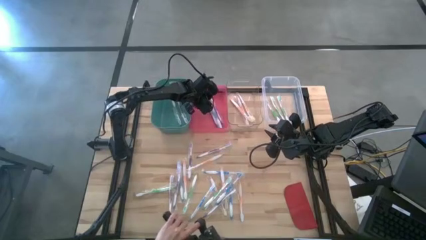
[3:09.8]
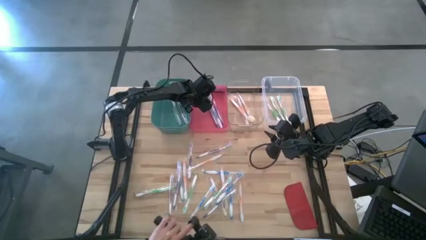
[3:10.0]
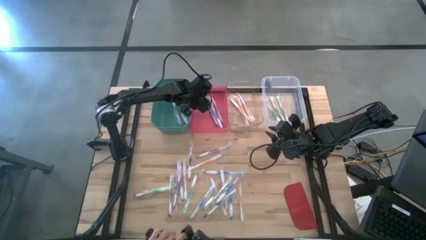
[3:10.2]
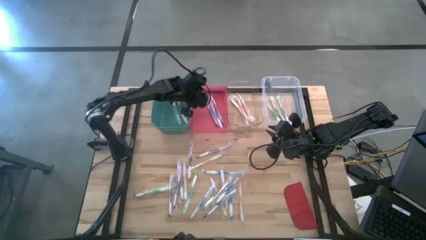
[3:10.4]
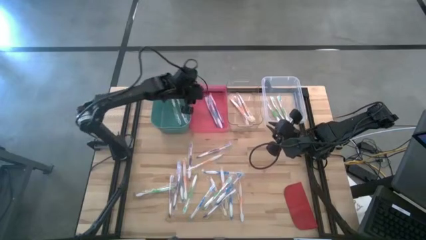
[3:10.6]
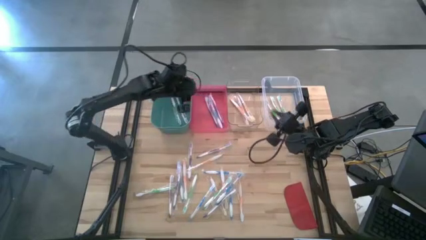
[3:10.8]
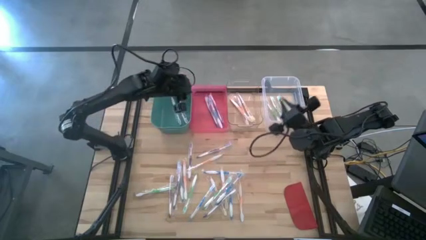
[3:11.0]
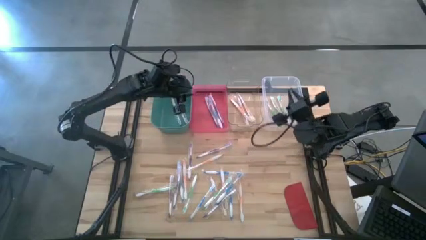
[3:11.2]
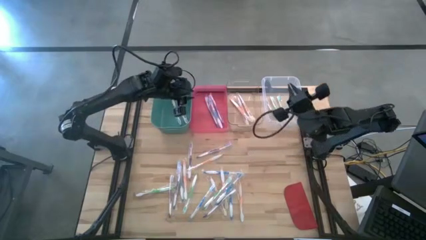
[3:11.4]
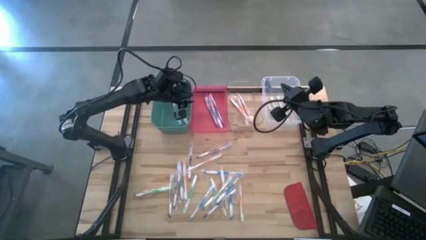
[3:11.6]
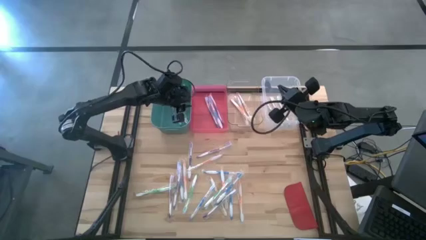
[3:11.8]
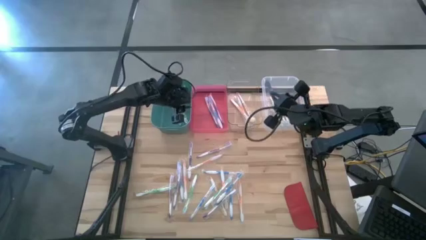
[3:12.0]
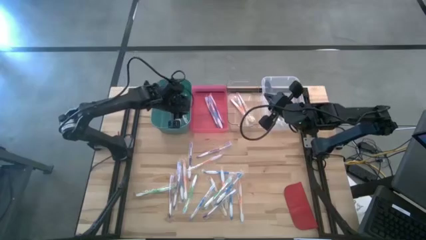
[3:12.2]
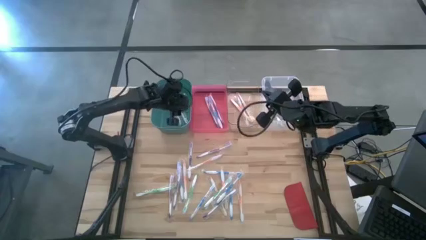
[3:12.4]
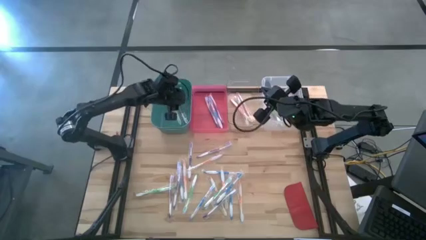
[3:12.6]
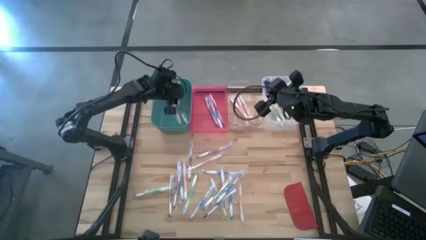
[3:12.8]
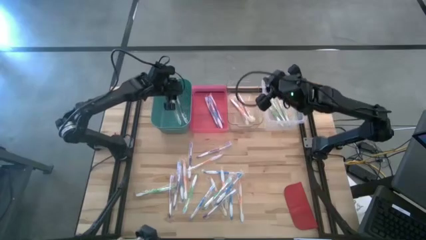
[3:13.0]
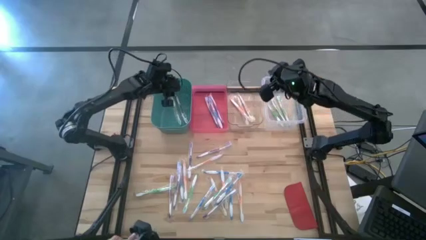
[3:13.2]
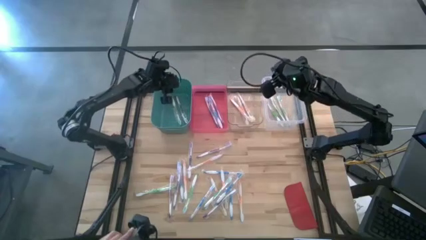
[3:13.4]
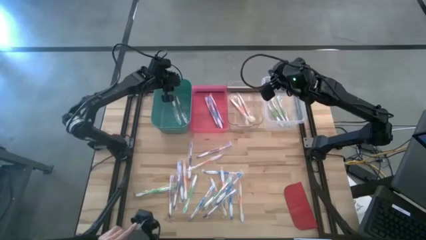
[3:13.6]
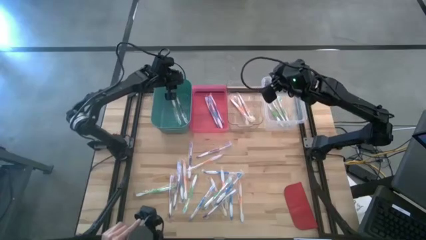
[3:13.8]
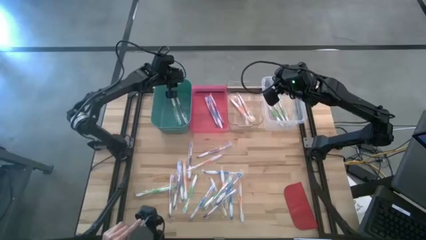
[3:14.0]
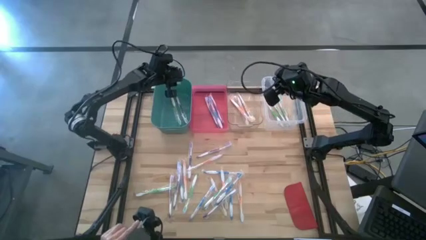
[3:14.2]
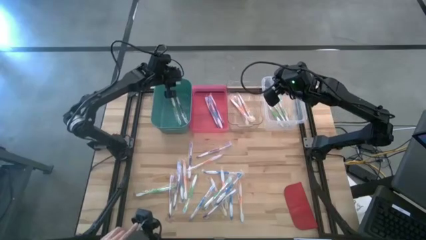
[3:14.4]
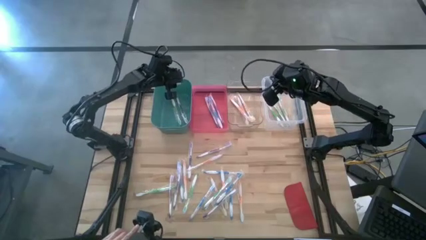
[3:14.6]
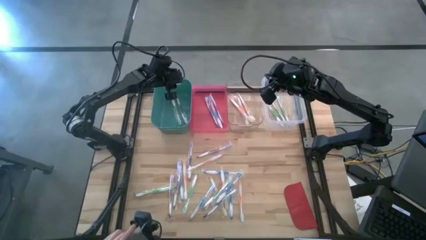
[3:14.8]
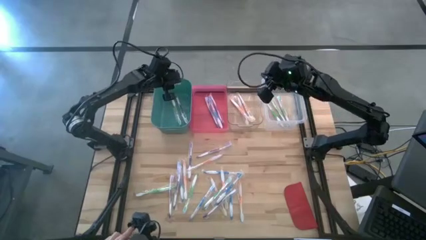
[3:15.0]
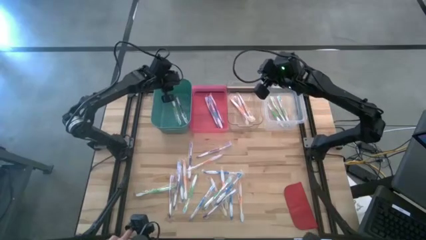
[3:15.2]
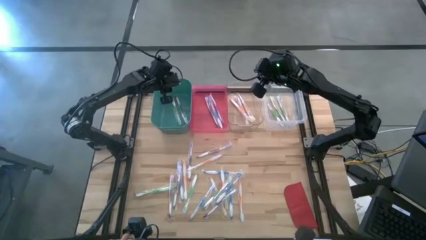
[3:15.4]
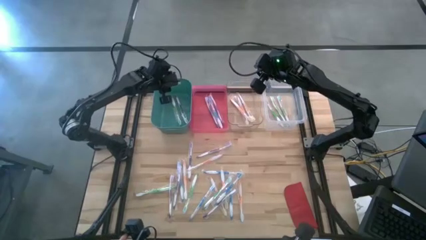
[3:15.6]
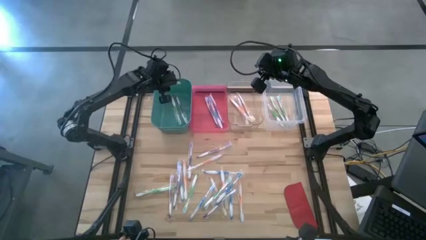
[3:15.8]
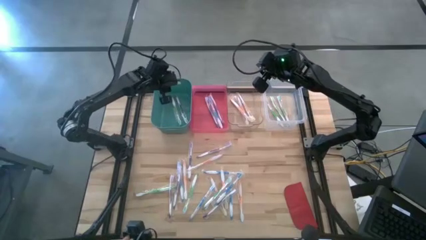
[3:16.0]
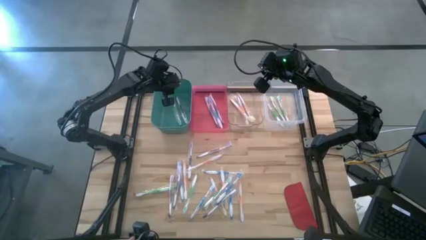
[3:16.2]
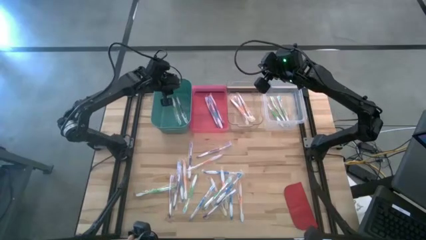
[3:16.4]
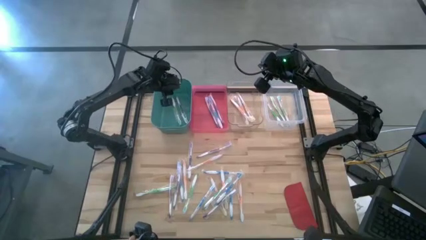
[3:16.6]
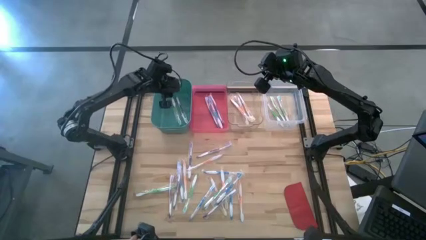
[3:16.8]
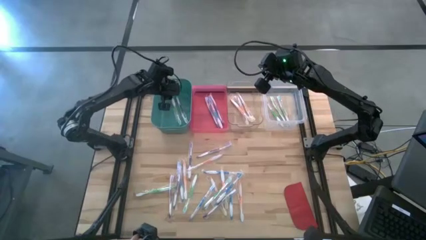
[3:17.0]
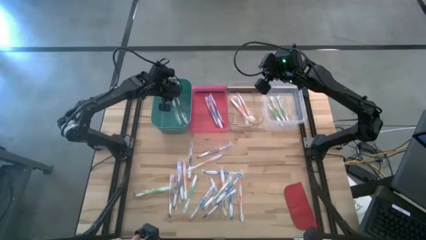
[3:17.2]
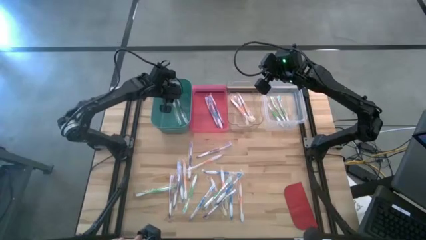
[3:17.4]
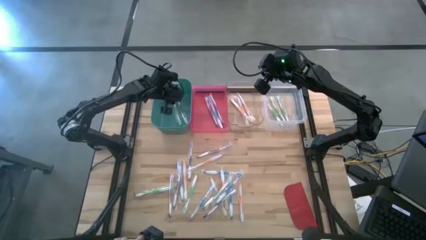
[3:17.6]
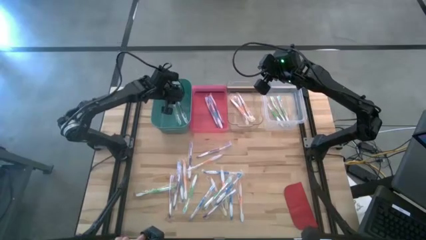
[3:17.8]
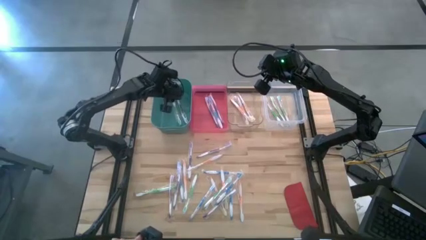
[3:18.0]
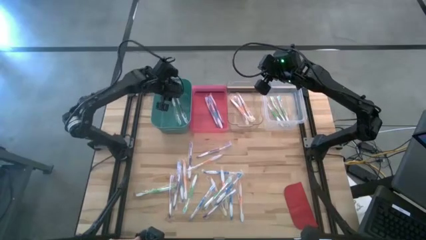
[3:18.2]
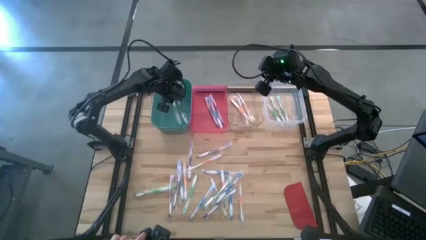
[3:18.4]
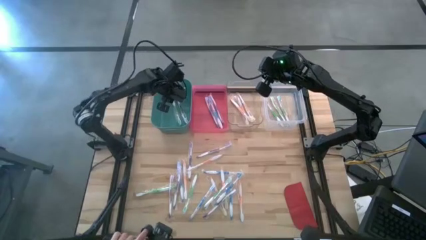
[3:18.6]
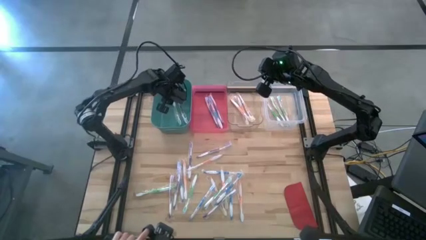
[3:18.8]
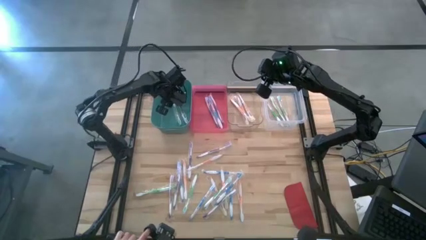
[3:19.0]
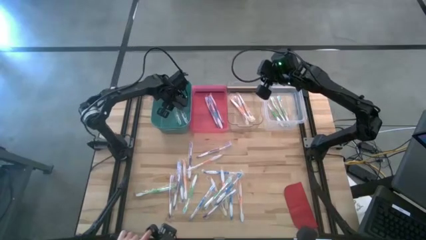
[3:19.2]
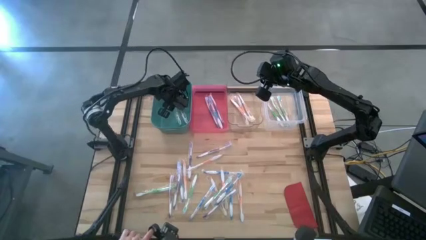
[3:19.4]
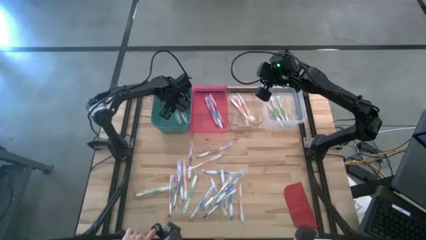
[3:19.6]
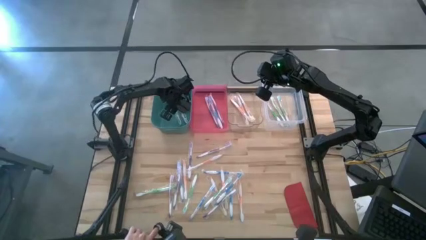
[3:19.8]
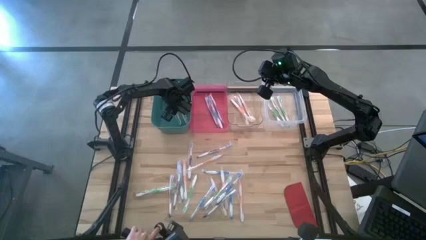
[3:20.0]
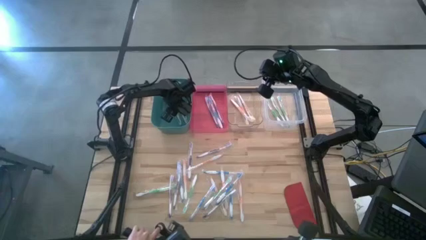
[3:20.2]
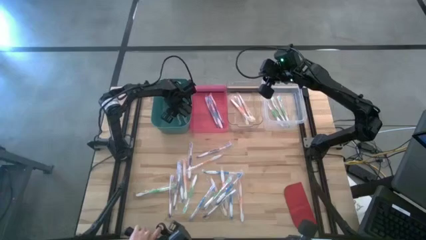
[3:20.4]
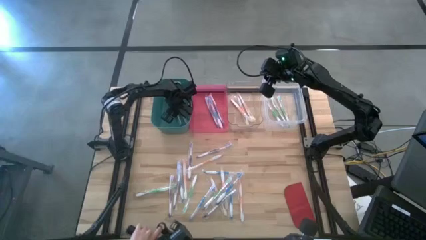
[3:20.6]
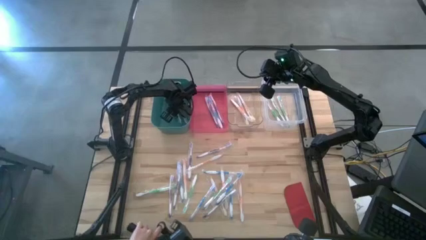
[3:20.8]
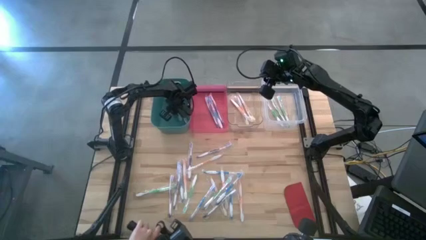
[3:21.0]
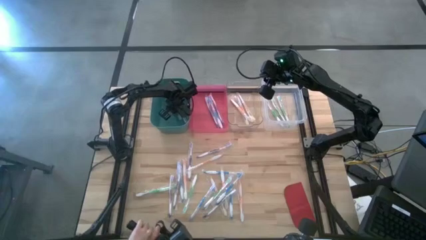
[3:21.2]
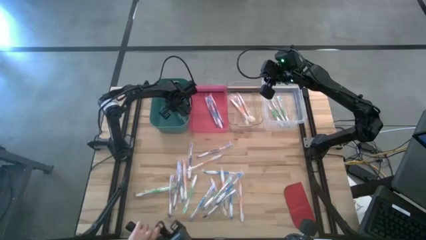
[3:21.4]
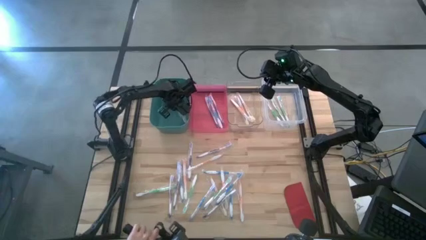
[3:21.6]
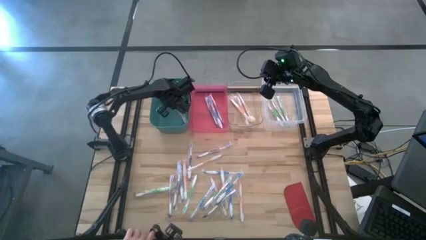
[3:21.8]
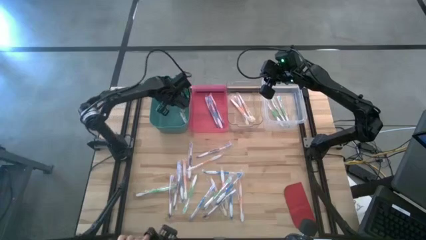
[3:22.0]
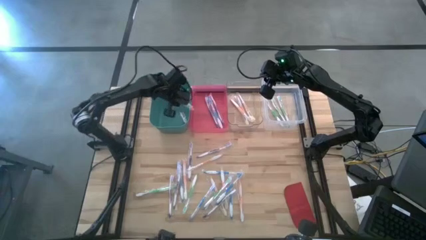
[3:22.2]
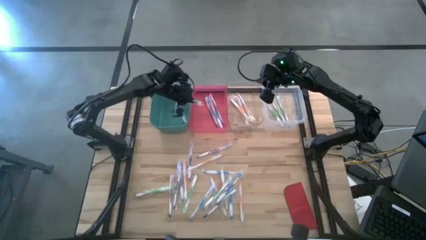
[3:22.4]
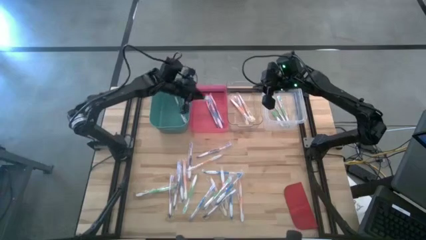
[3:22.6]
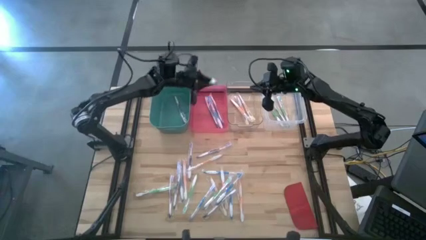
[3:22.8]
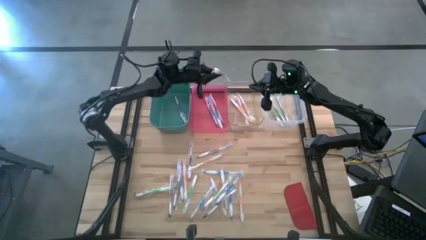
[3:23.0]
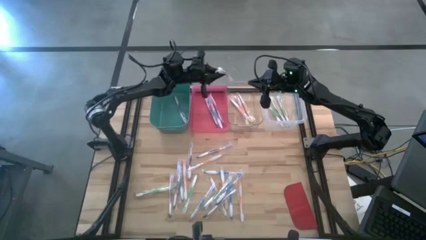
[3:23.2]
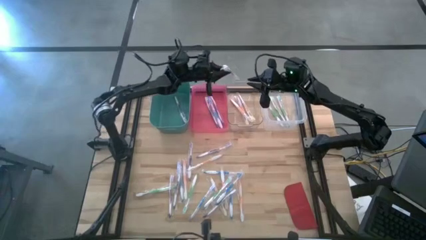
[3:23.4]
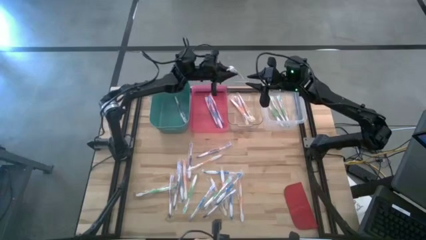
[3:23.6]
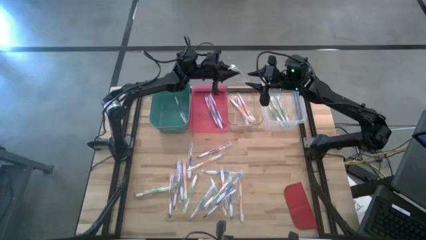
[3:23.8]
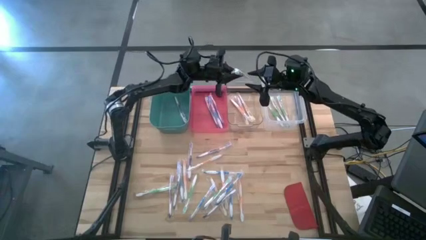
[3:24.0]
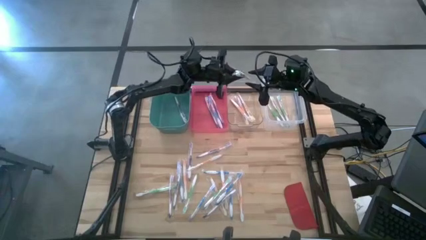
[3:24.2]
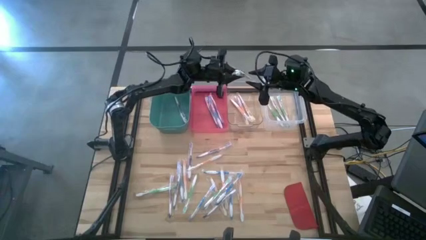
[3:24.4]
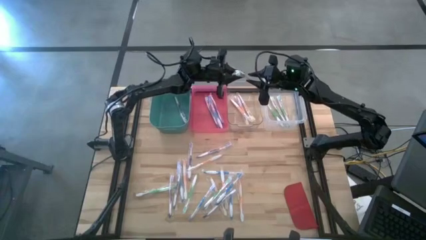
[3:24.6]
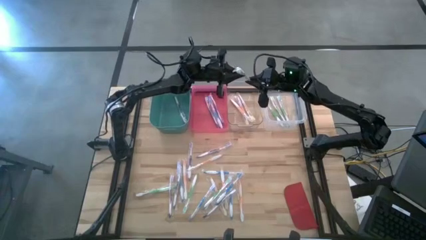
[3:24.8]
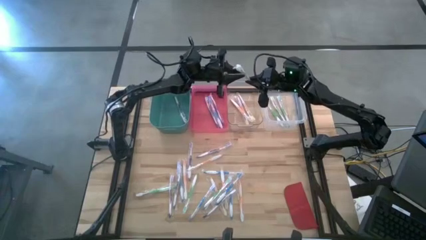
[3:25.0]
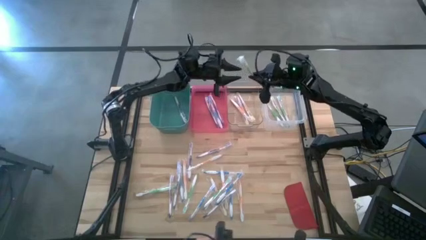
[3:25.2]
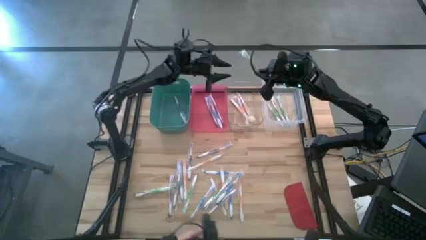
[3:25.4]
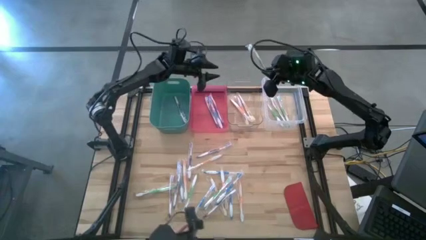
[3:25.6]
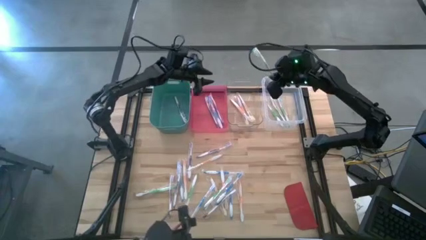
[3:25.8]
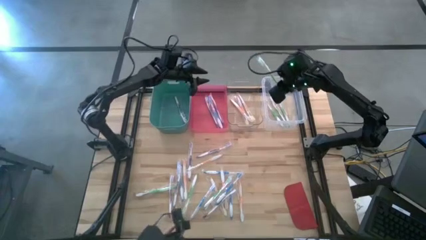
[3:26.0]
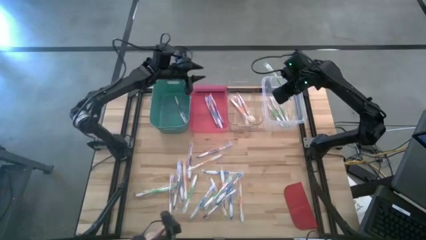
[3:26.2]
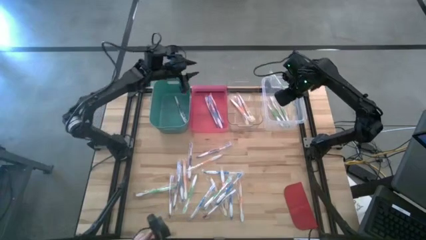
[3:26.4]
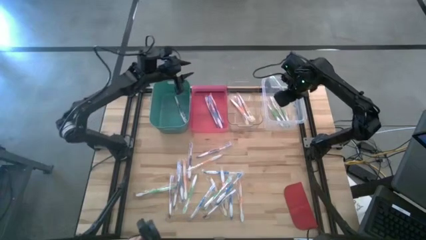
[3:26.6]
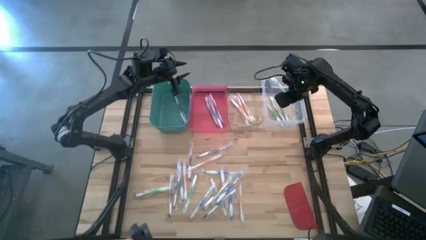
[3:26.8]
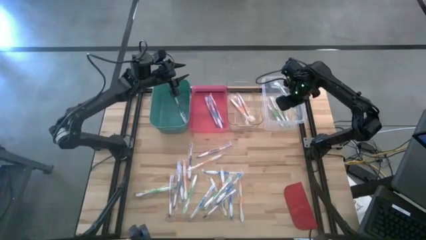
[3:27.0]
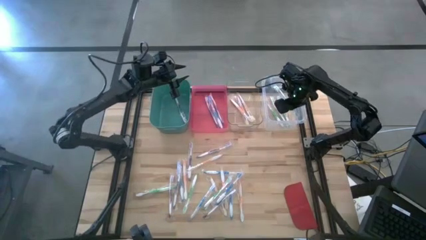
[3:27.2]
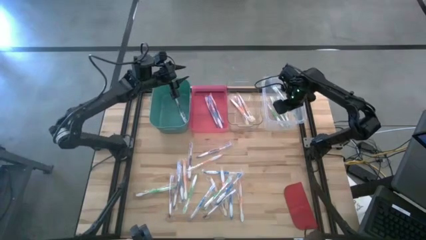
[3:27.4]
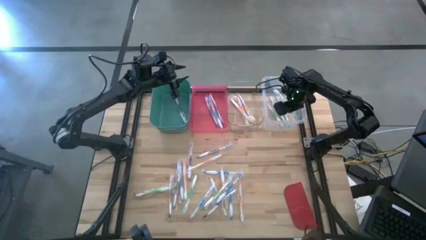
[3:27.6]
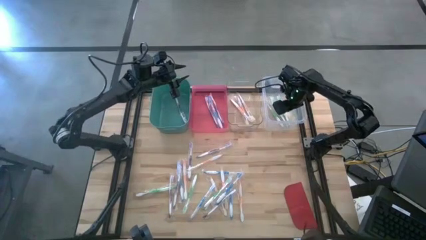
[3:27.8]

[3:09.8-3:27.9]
Task: Pick & Place Toothbrushes
Put the green toothbrush into the white bin
